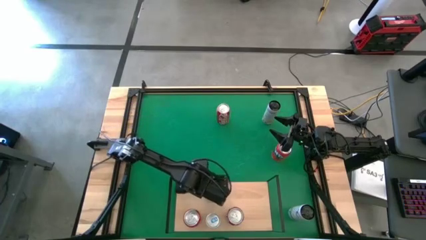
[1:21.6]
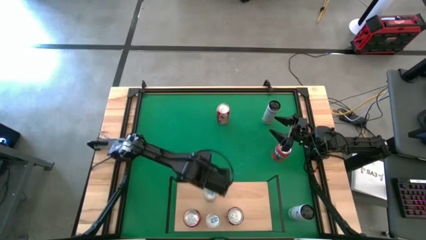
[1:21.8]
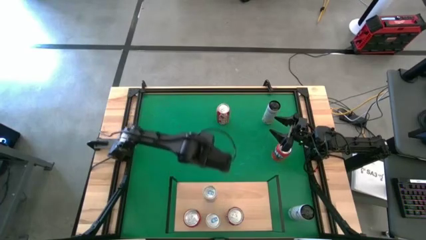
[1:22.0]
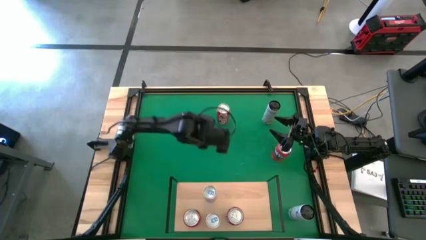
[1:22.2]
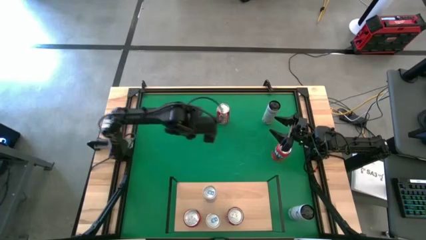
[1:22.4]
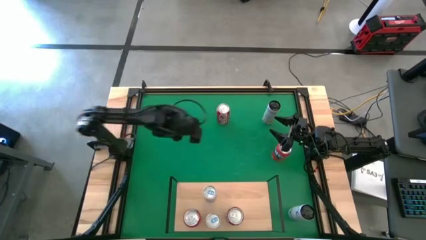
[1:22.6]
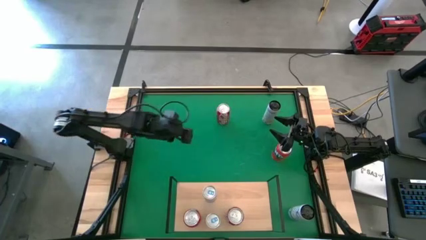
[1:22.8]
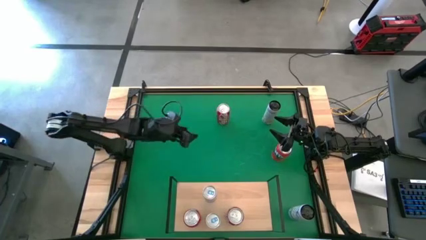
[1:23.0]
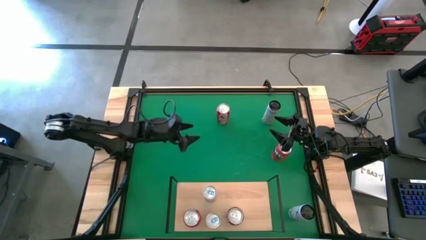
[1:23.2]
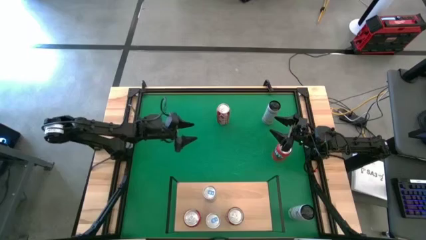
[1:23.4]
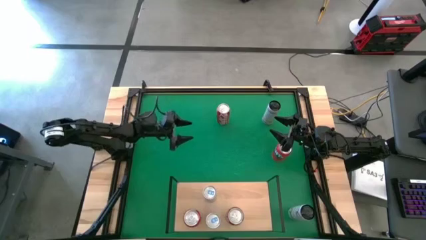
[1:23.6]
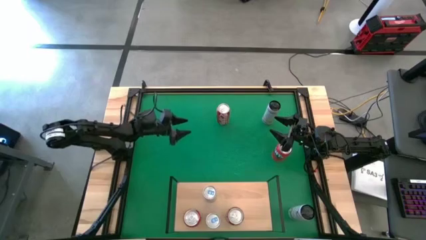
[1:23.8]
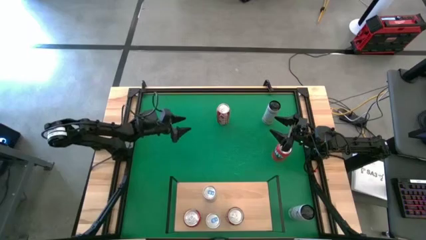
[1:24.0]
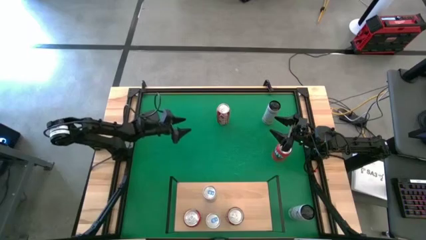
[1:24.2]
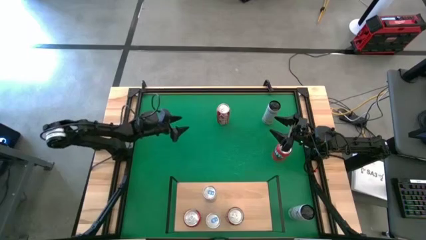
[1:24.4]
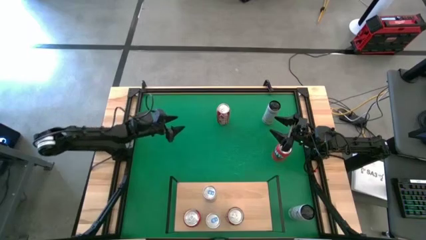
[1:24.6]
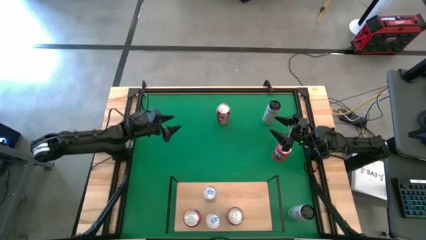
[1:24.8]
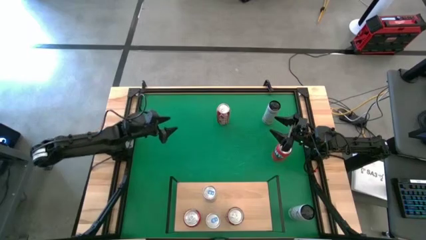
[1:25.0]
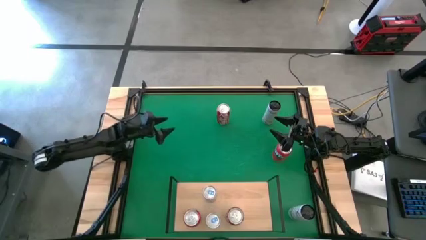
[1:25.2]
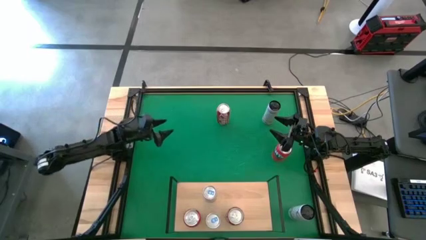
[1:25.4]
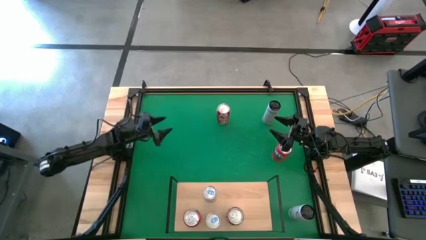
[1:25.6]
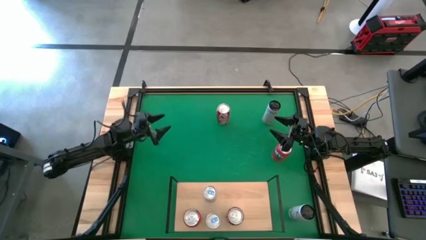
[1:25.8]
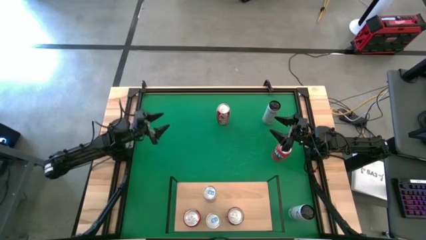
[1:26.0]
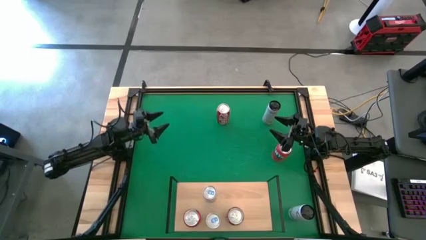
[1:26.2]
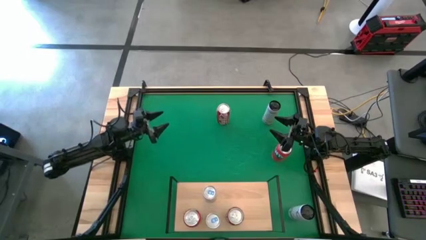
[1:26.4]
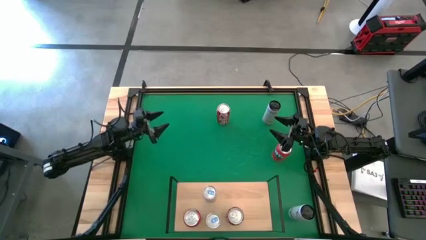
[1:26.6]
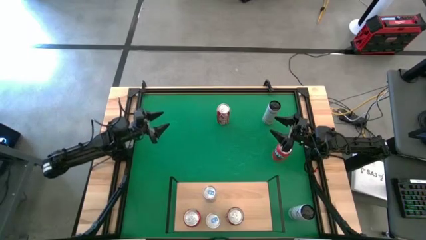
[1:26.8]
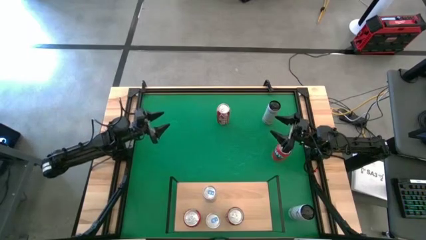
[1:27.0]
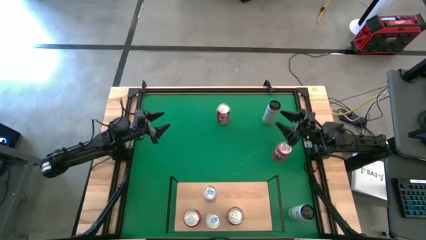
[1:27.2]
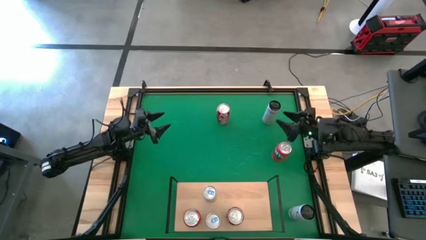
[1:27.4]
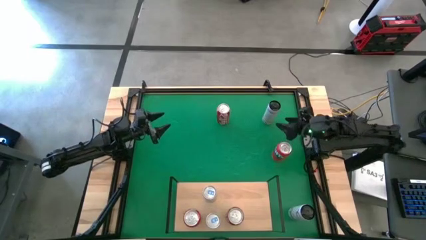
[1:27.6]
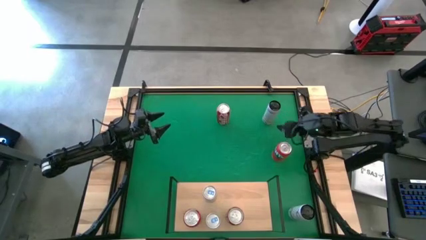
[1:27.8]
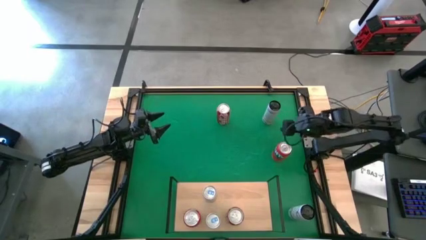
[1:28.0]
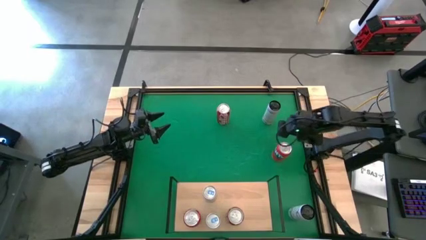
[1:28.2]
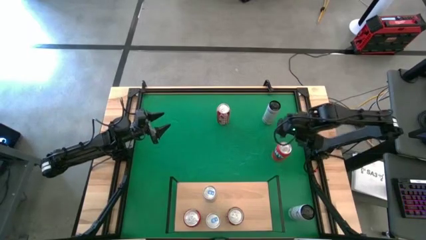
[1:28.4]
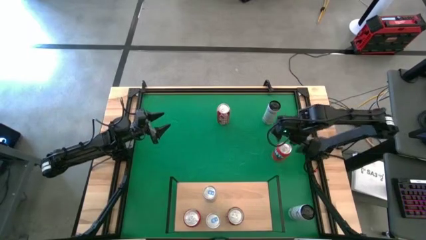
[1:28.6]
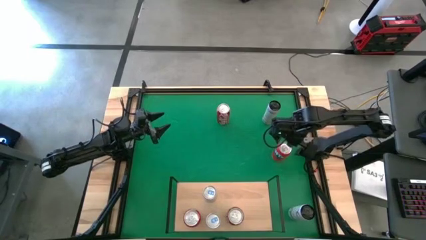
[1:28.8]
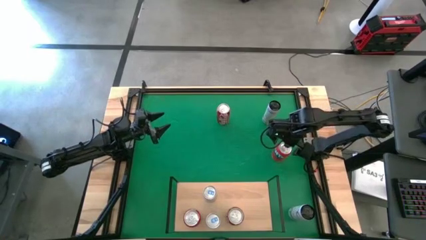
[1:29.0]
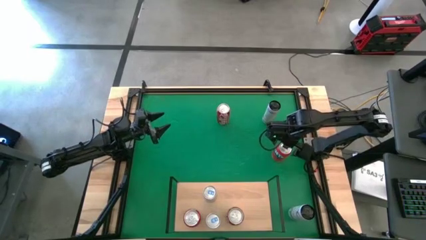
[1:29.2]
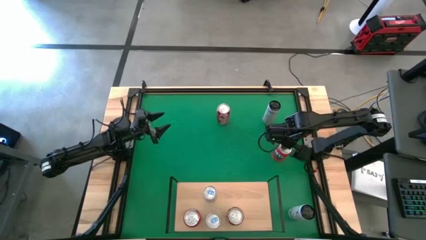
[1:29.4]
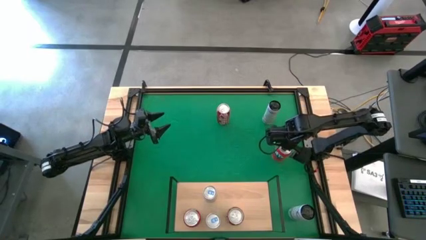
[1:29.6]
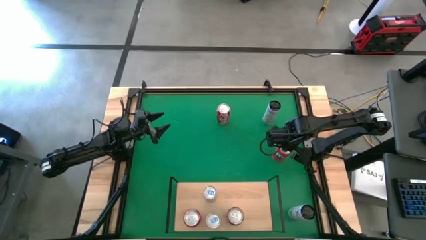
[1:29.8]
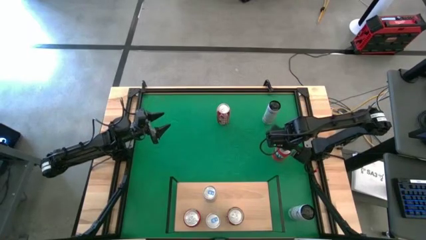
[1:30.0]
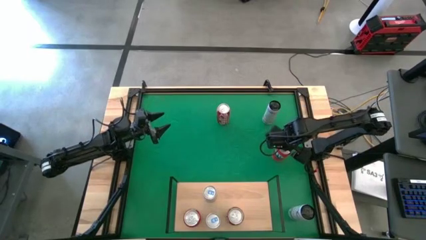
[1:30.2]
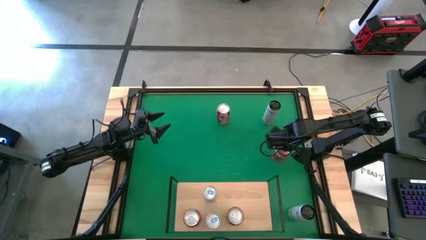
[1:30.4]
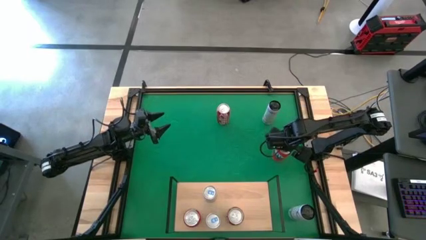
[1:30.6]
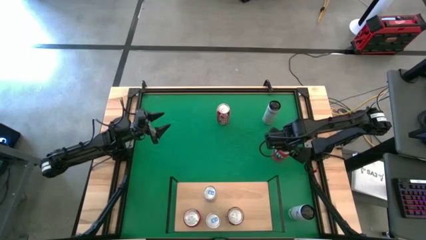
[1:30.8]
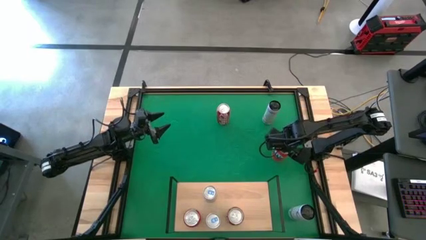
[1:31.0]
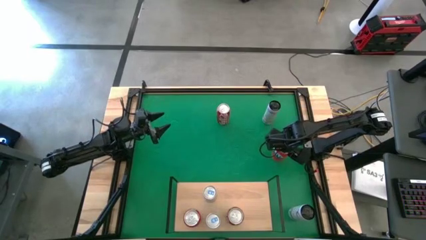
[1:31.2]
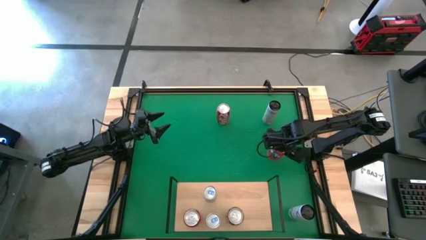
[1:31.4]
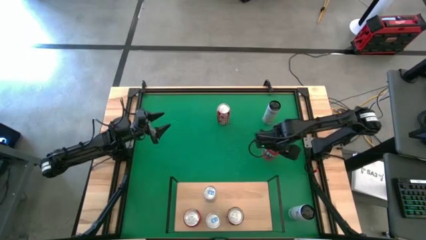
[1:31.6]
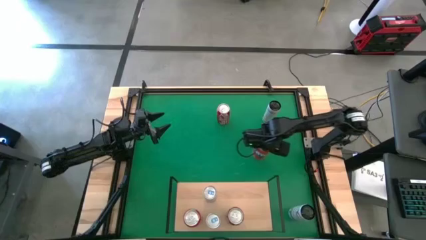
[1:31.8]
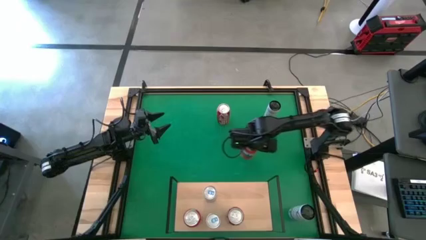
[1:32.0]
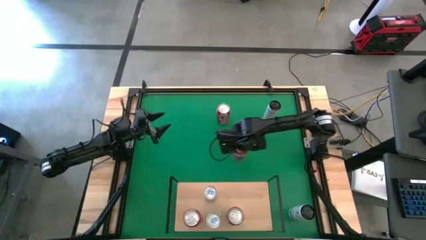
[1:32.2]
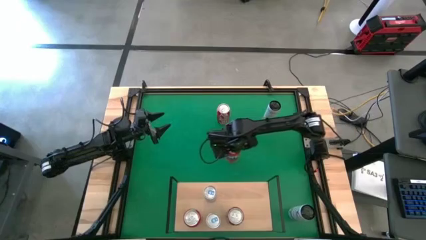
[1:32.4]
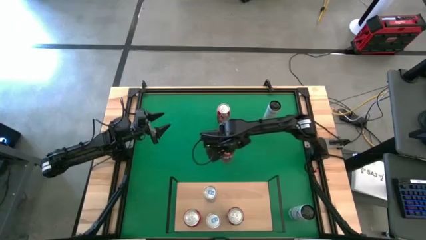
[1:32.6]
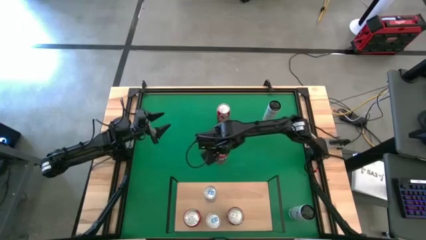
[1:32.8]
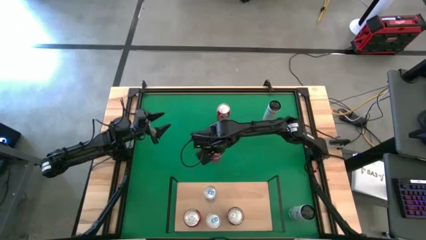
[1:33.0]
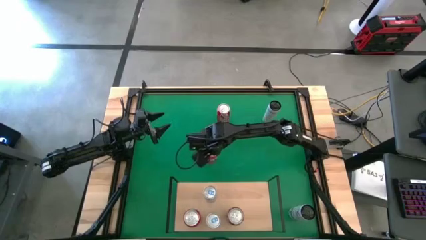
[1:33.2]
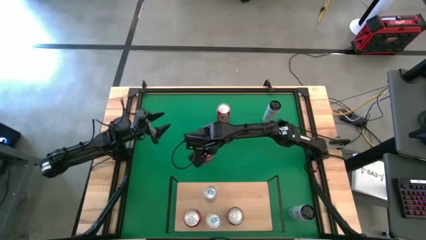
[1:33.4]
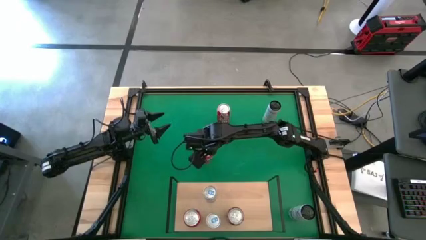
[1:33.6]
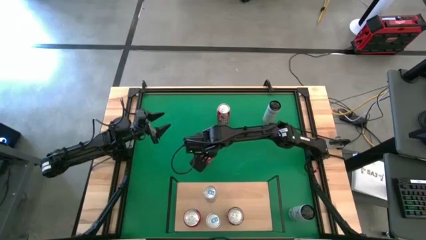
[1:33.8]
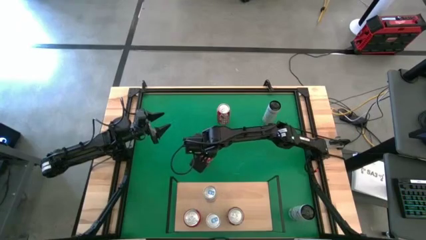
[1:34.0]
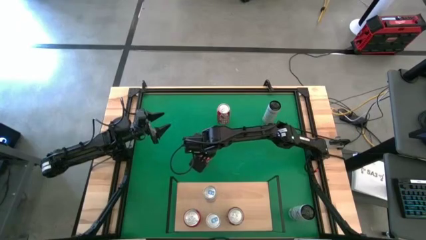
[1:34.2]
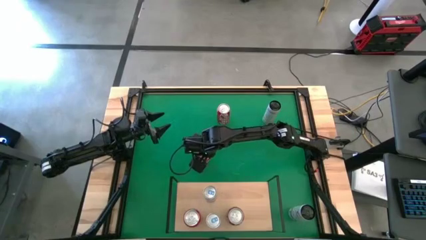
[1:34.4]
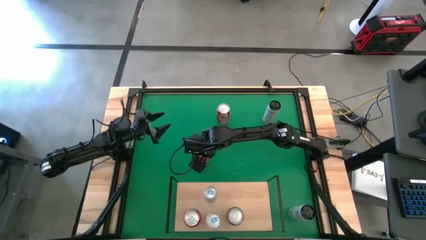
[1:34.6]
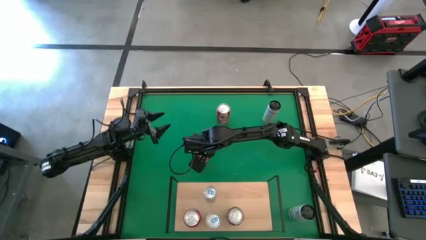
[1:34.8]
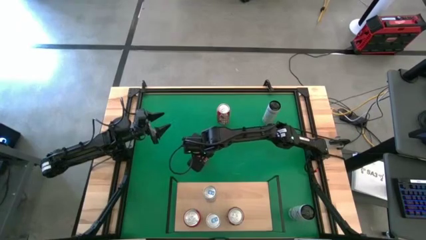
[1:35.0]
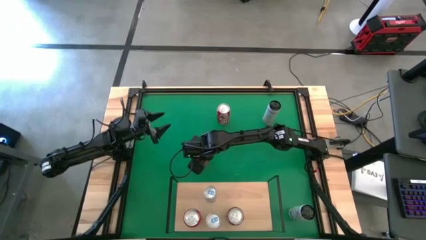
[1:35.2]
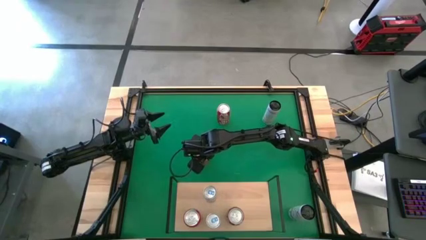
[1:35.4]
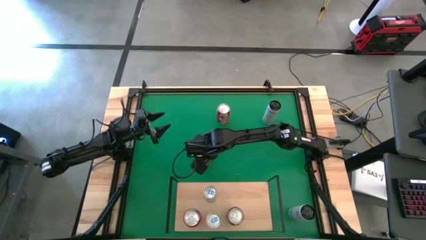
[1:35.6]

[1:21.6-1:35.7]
Task: Place canned beverage on shelf
Move the orange soda can to the center of the table
